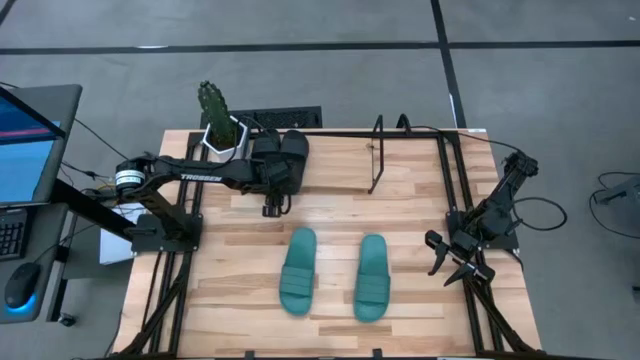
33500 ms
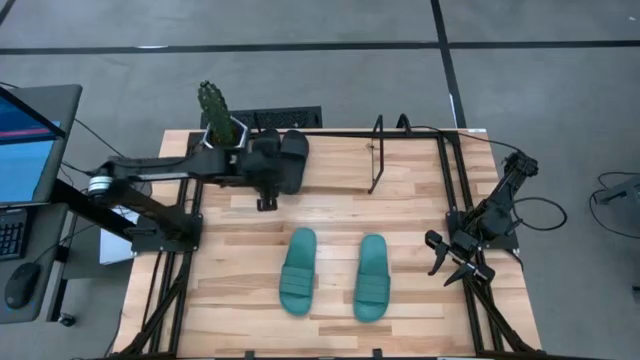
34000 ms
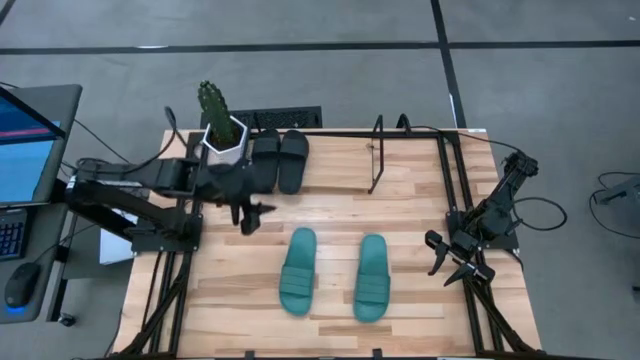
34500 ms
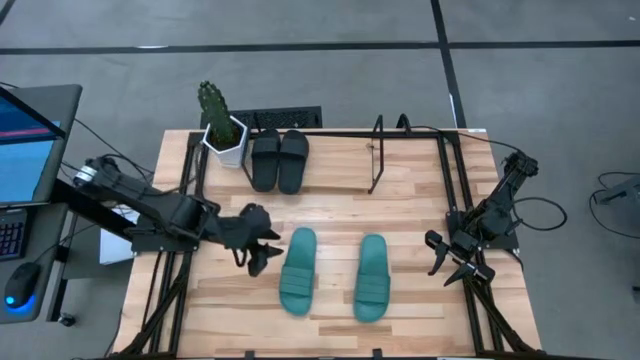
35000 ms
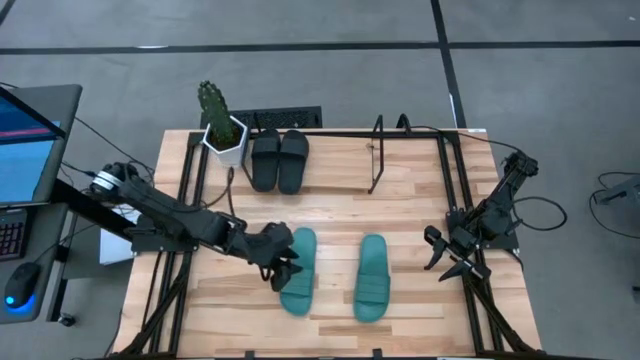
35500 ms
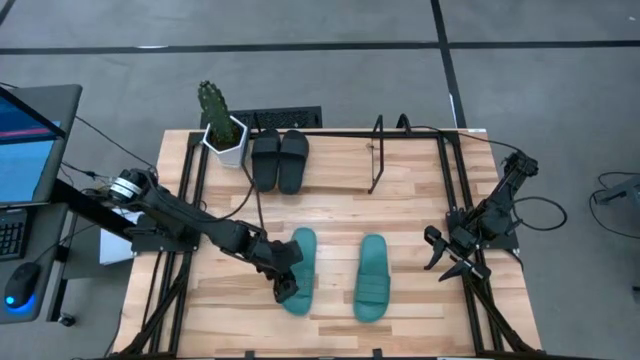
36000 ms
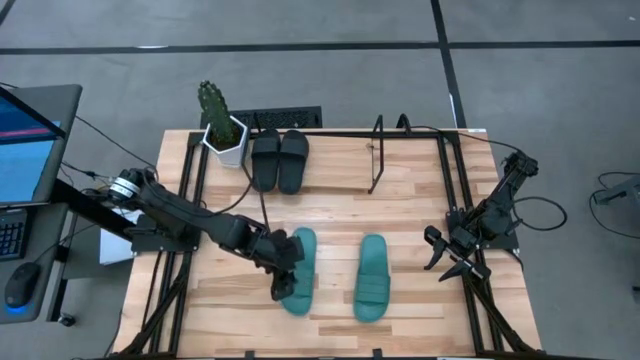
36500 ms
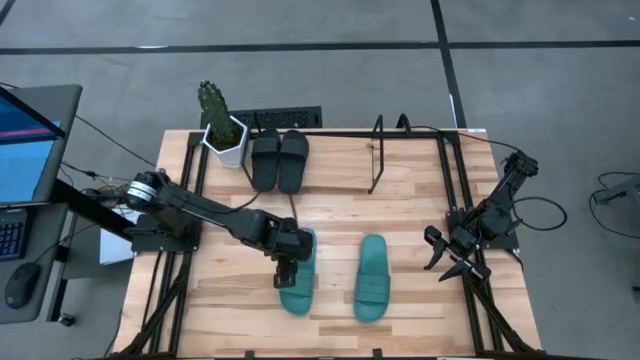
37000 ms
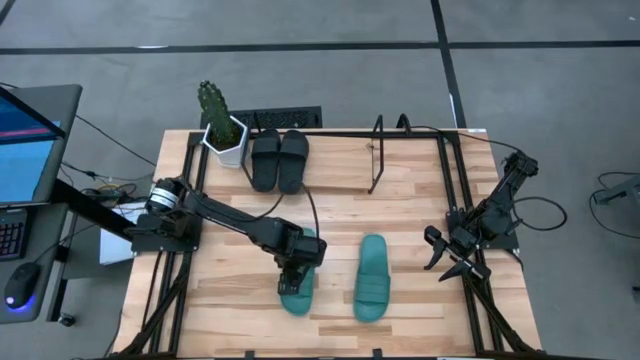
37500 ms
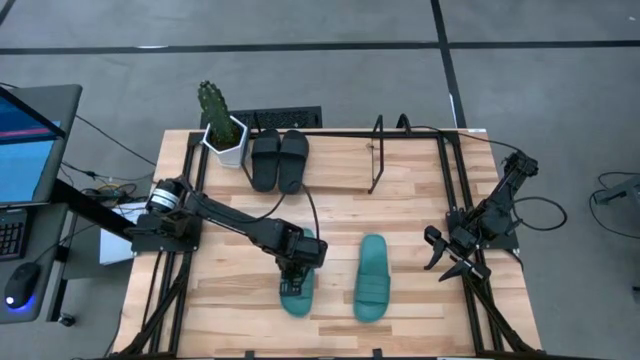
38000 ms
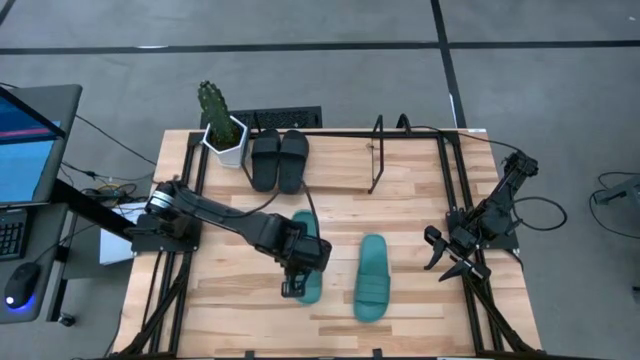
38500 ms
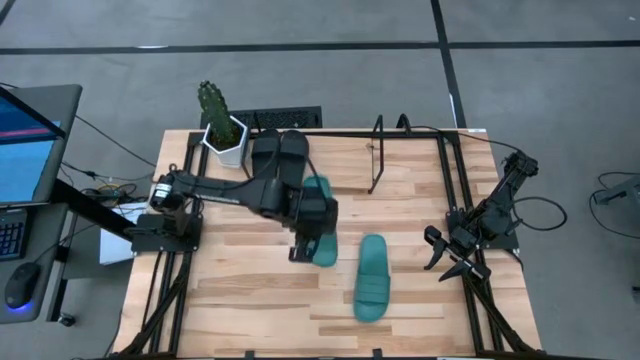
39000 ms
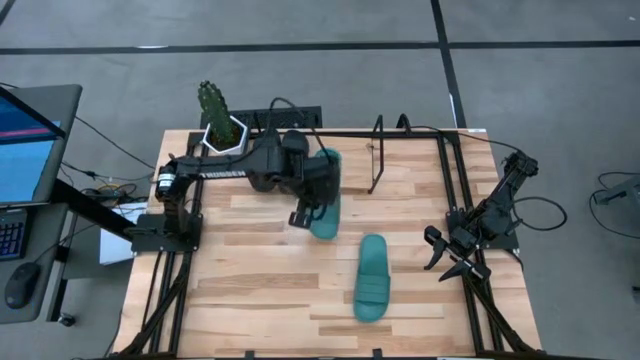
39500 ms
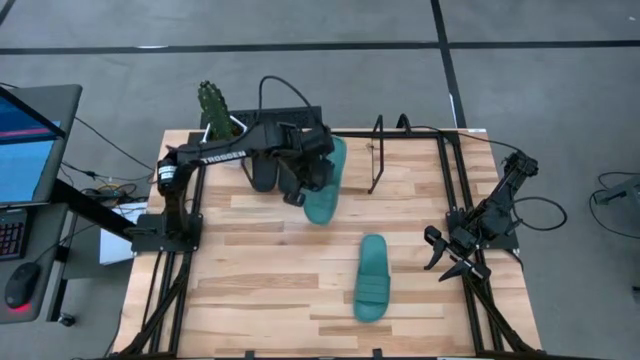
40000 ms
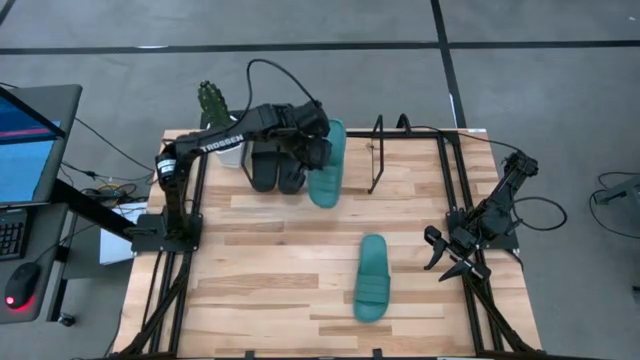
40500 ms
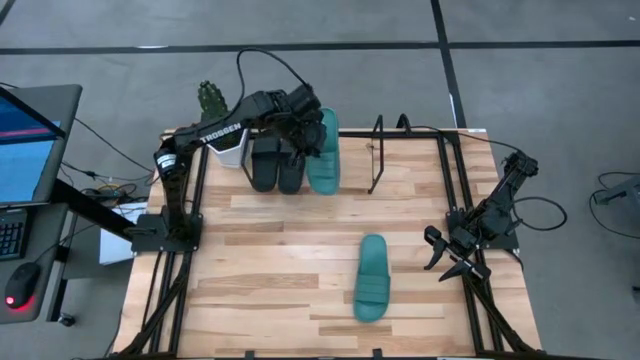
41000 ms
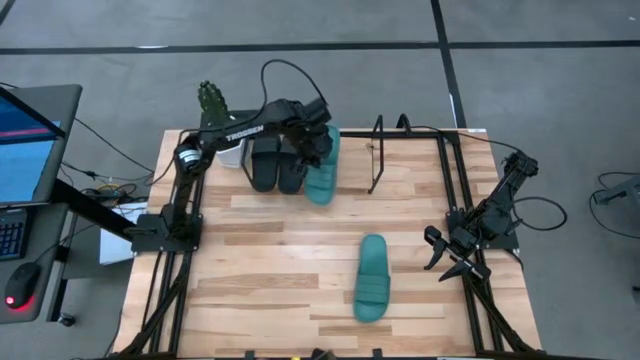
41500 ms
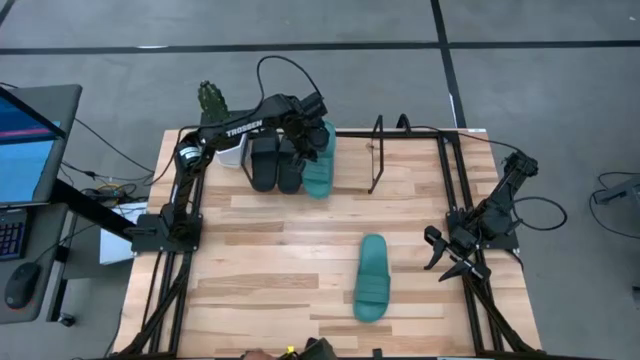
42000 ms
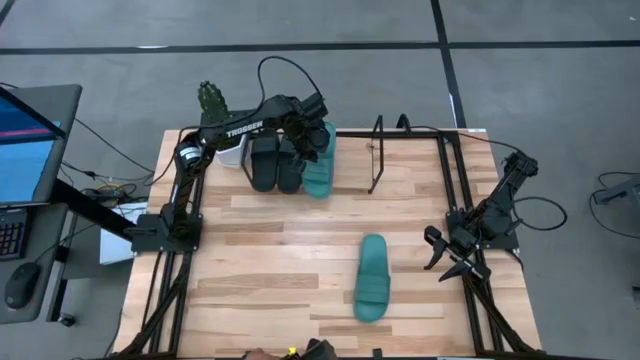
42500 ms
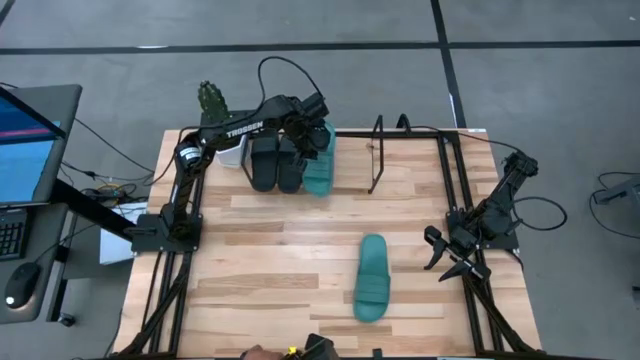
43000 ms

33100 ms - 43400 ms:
Task: Pick and place slides into the shelf
Put the left green slide on the shelf

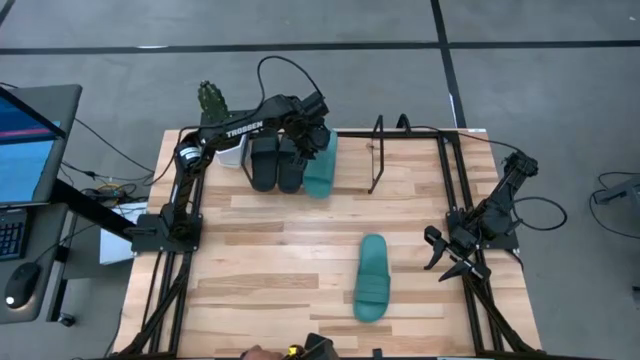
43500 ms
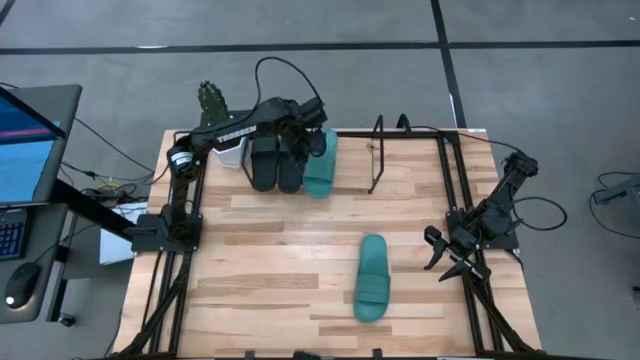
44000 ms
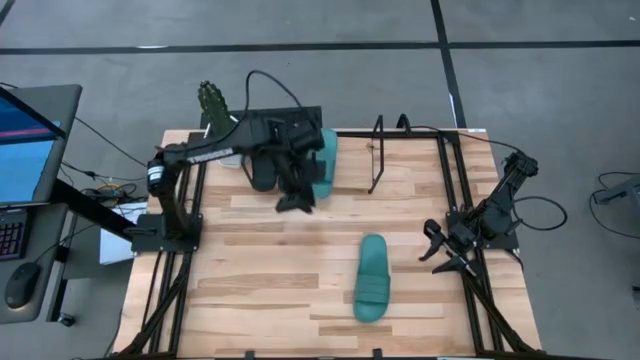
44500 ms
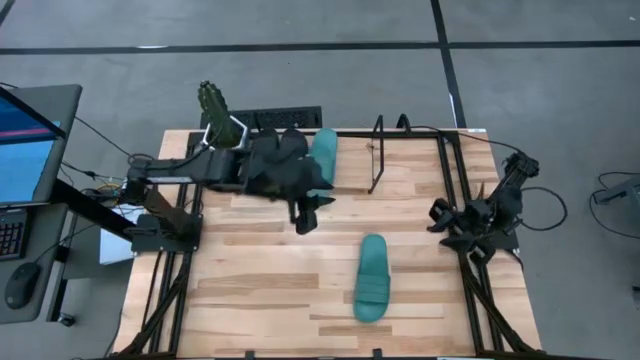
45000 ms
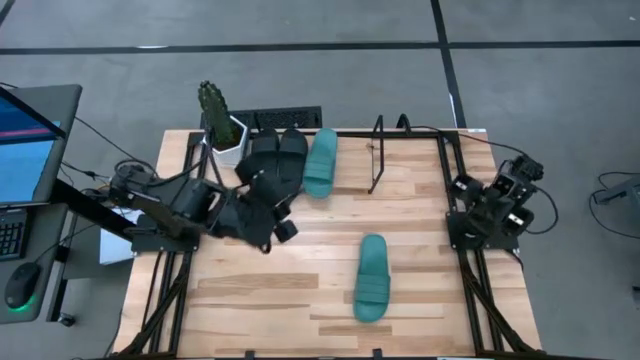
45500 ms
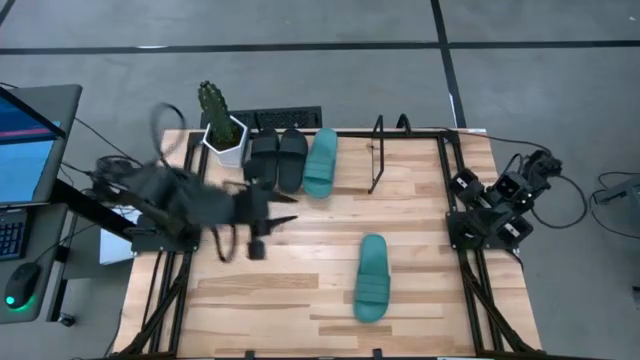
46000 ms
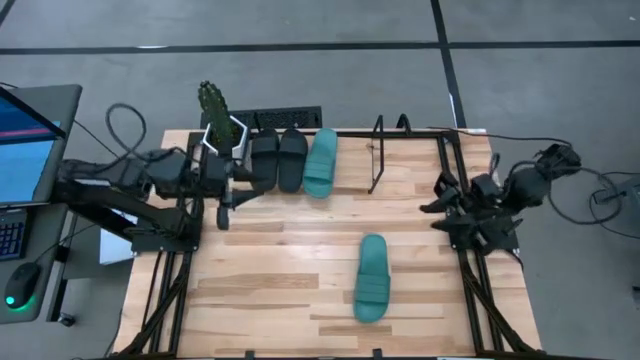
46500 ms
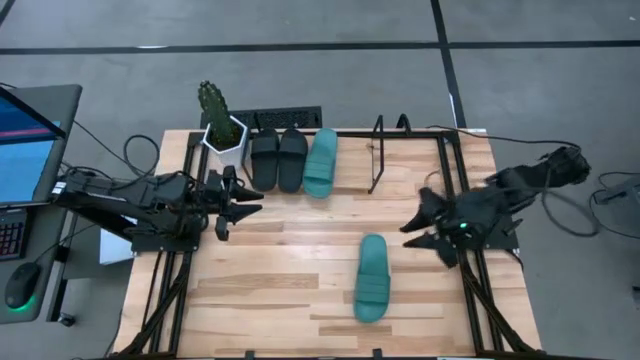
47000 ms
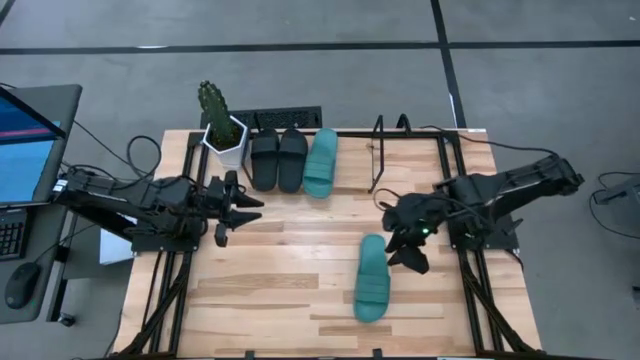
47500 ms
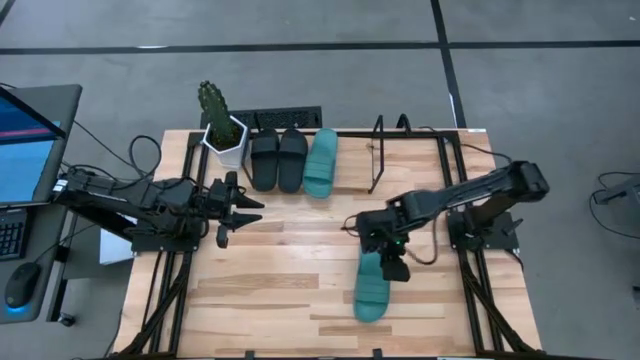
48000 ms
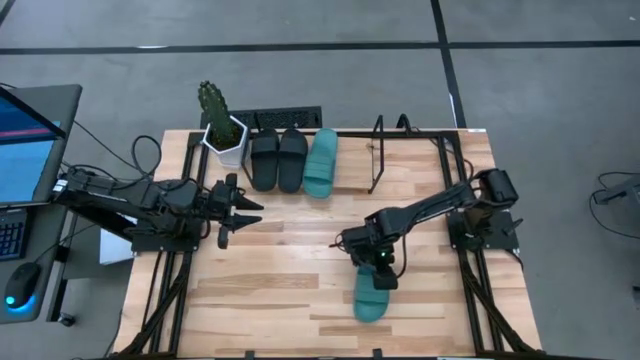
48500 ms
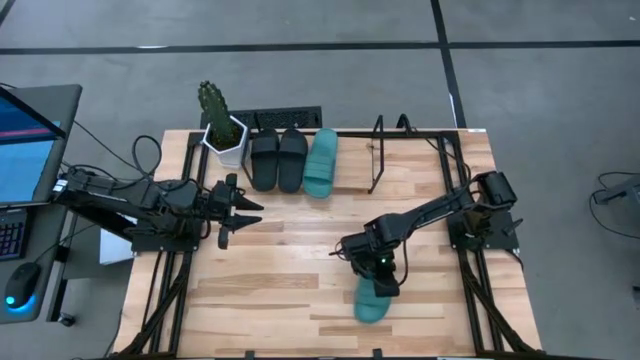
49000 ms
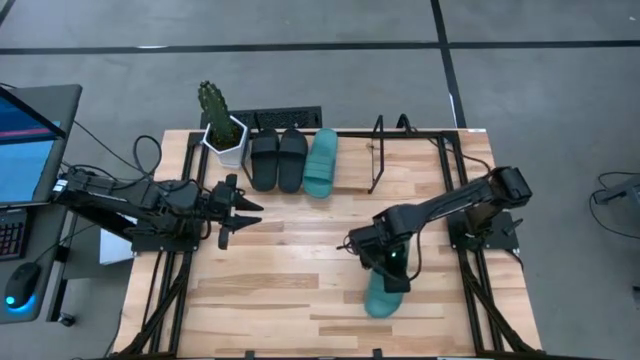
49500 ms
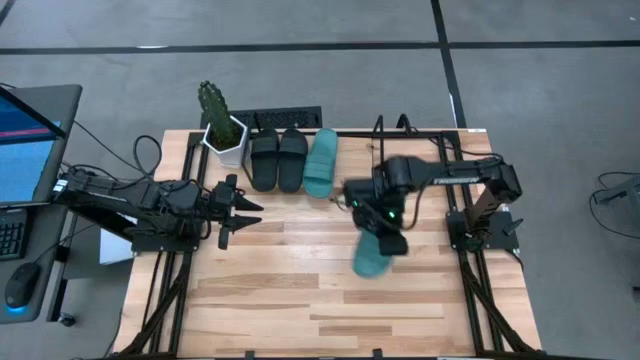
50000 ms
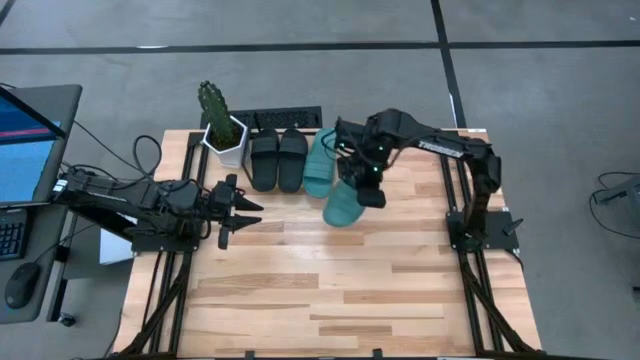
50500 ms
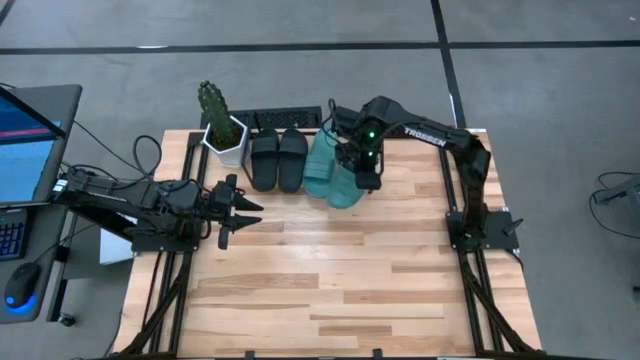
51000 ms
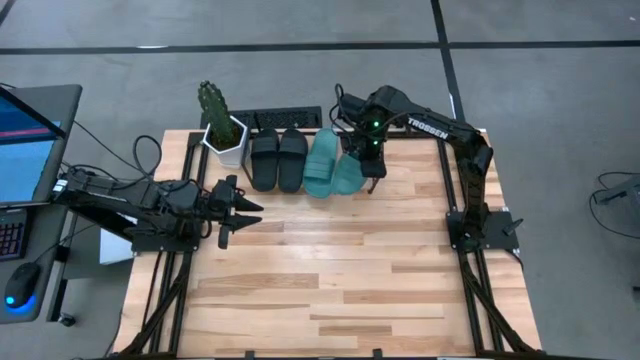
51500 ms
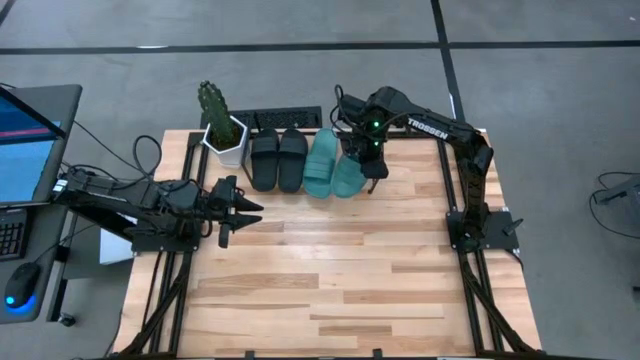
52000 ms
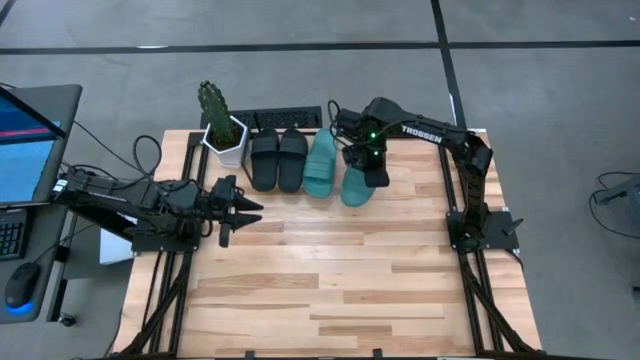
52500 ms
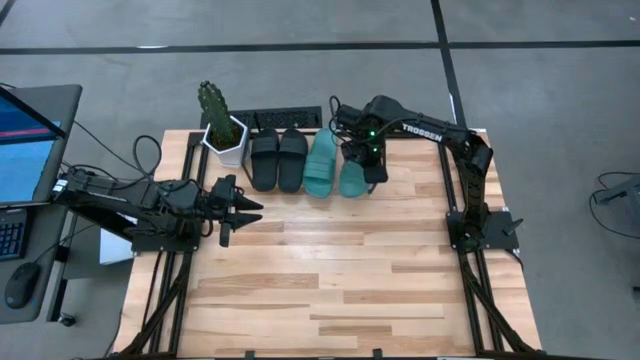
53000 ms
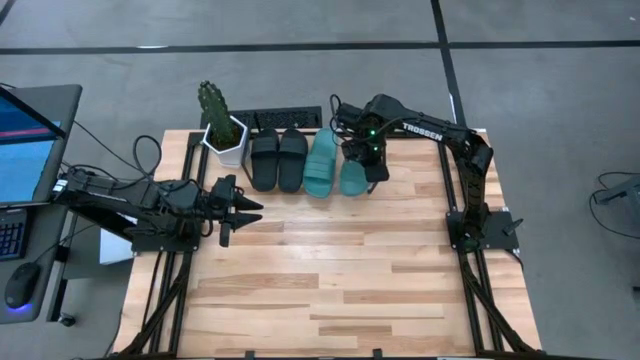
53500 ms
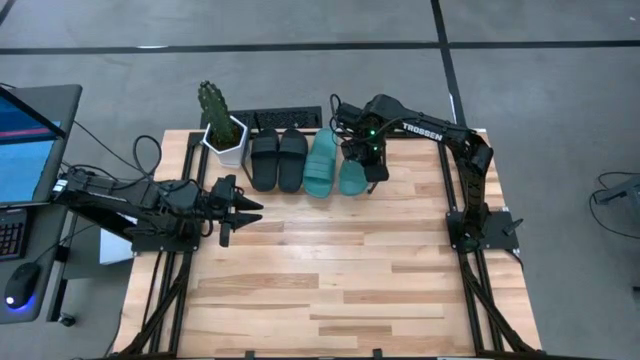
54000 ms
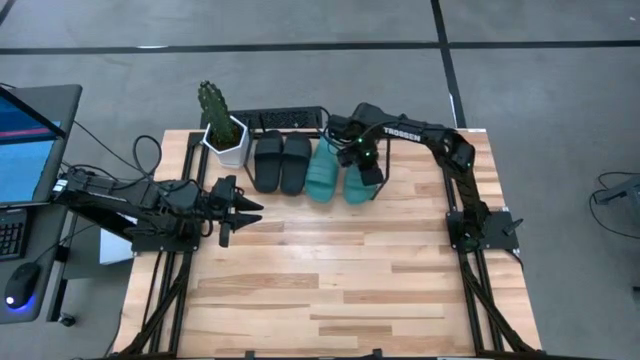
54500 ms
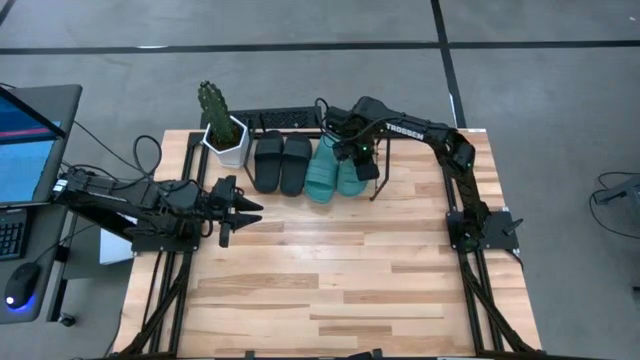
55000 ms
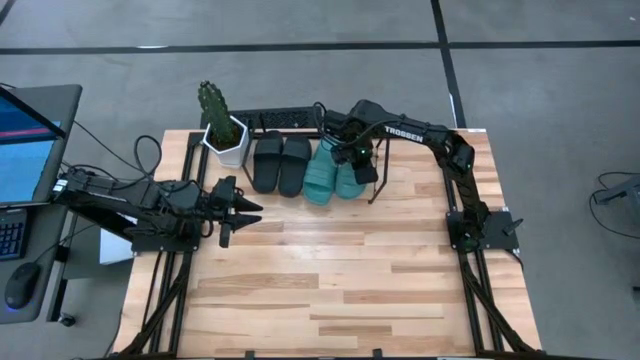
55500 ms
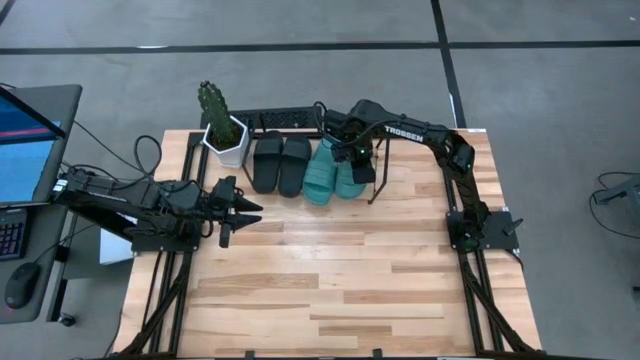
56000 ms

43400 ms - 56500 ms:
Put the green slide on the shelf
